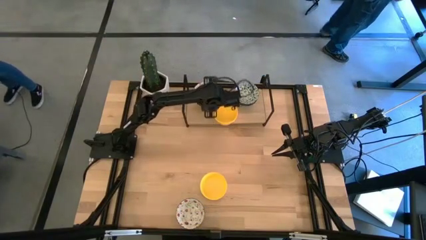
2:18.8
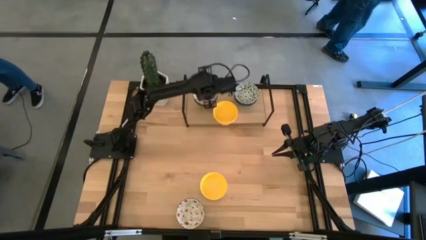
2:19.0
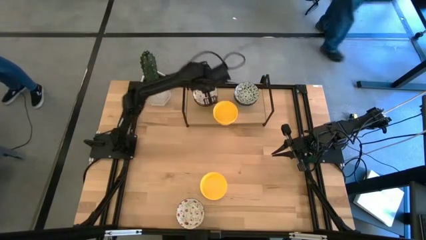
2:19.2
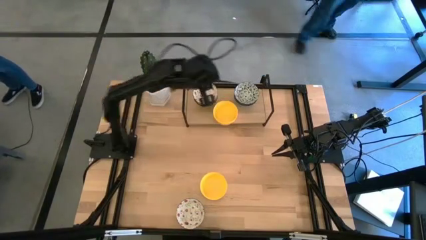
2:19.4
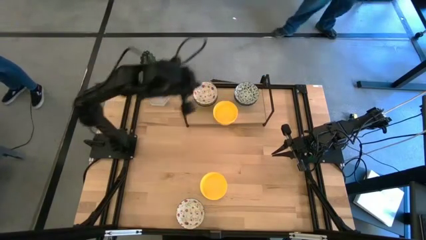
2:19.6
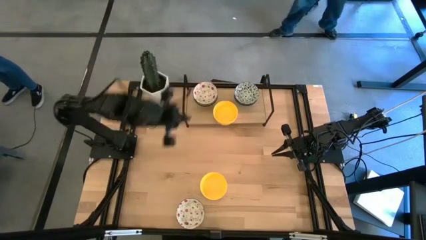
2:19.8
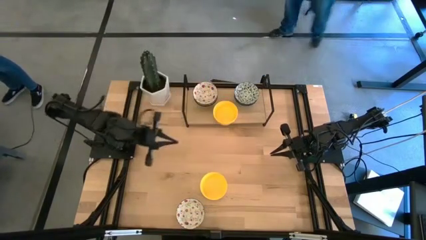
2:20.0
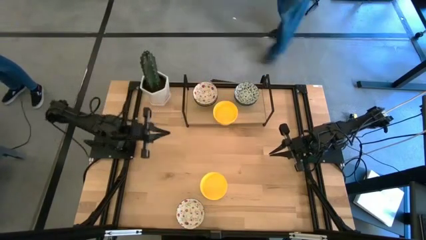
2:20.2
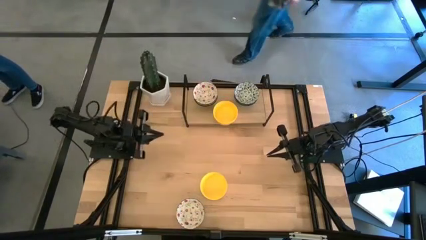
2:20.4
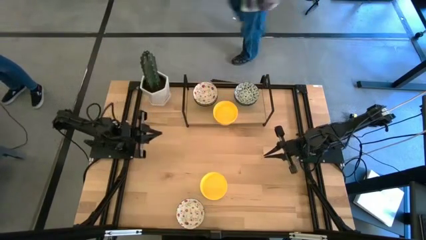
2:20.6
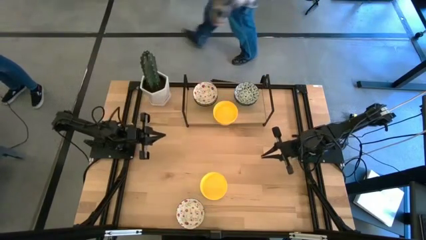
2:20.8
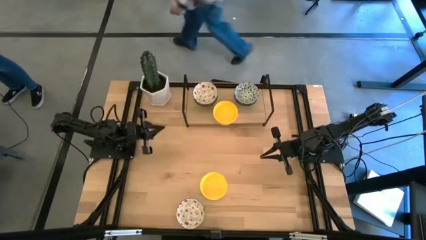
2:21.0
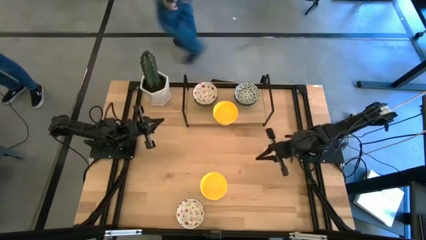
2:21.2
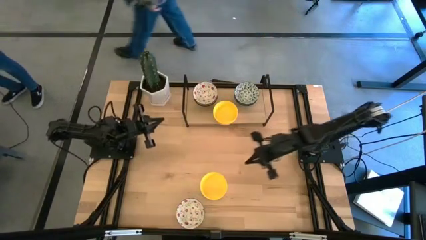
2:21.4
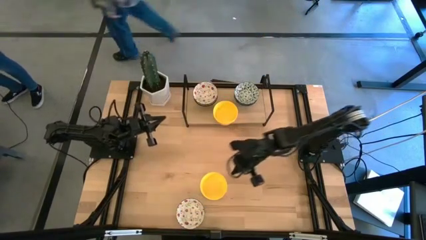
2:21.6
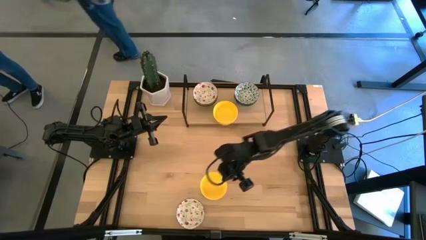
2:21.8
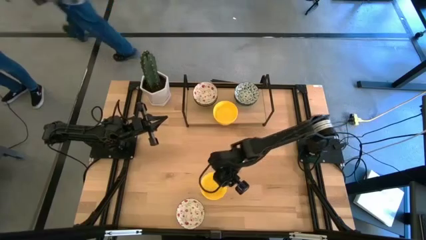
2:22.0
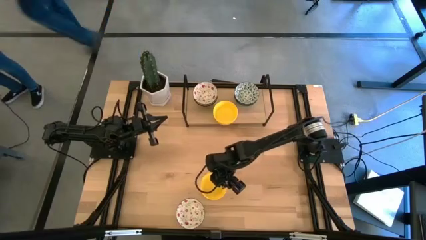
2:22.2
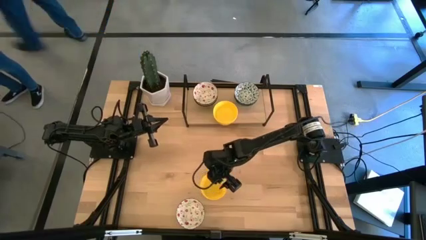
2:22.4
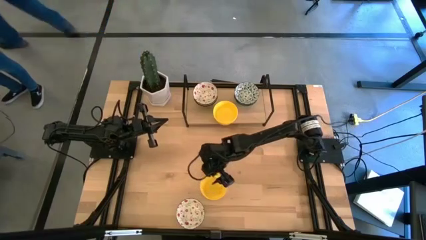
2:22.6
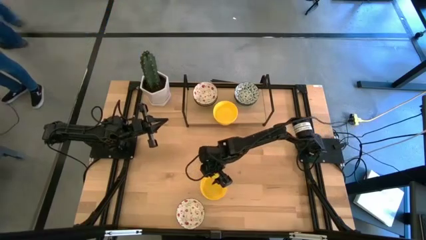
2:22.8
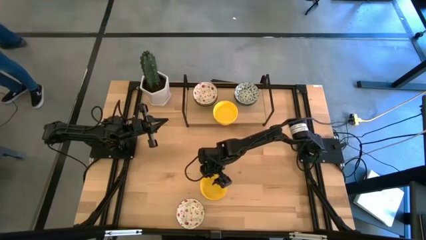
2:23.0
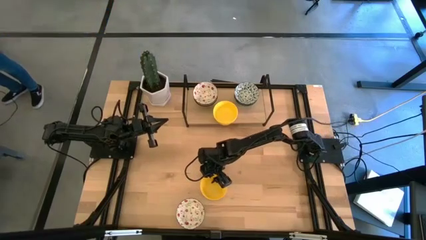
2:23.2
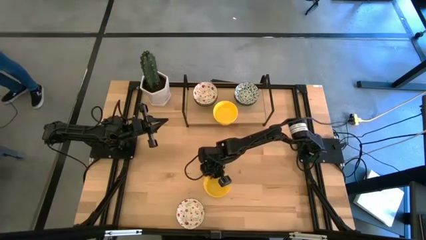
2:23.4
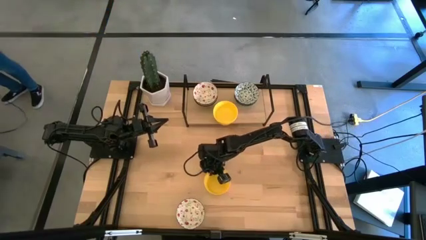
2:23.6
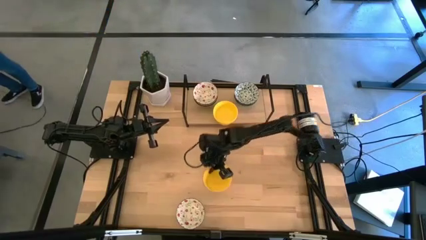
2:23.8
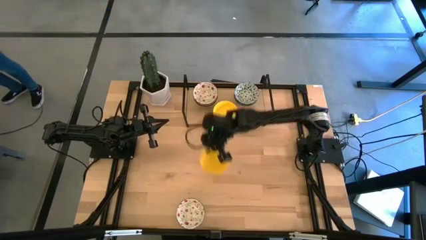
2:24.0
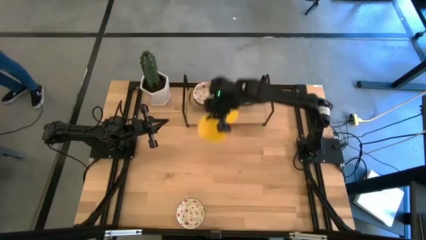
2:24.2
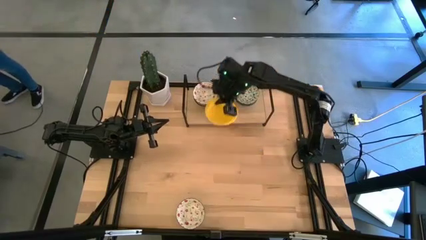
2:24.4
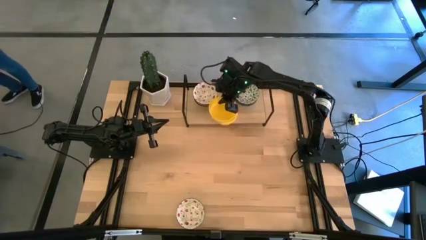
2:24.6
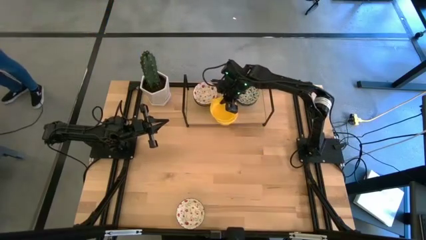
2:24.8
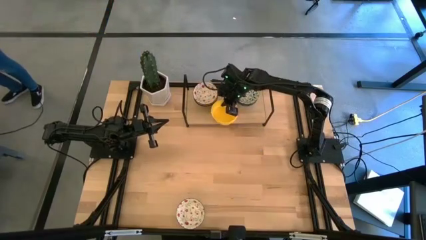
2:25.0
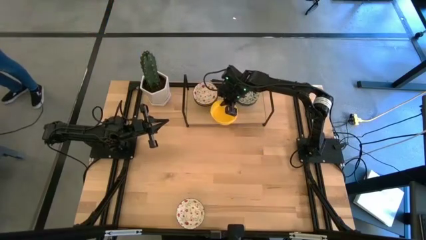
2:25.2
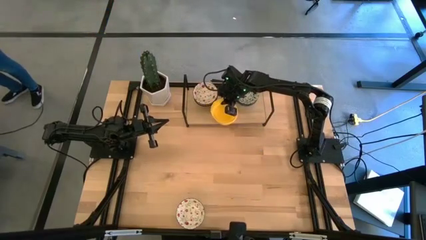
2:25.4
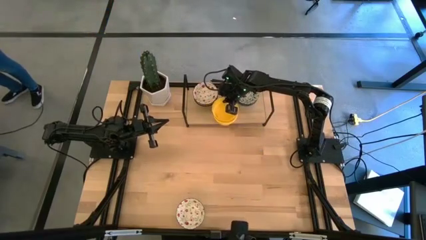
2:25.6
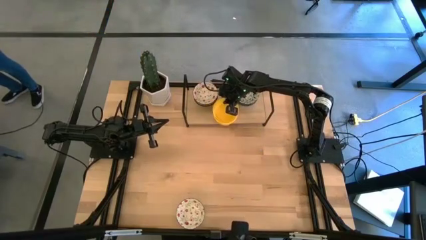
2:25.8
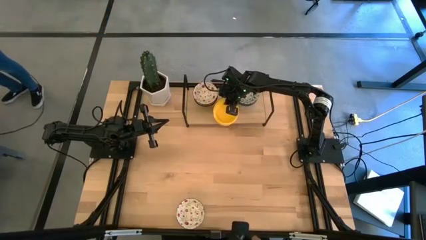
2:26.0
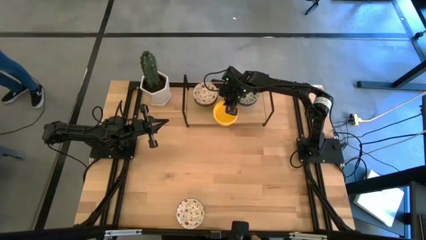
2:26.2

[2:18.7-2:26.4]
Task: Pick & Place Mini bowls
Stack the yellow bowl on top of the yellow bowls on the shelf

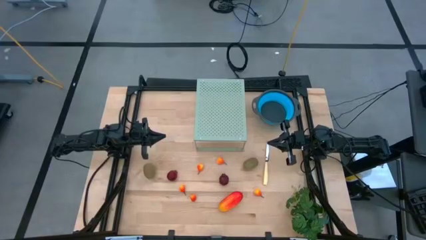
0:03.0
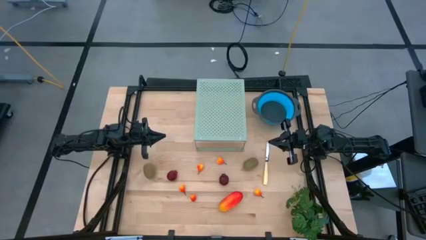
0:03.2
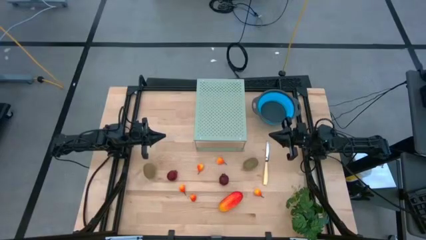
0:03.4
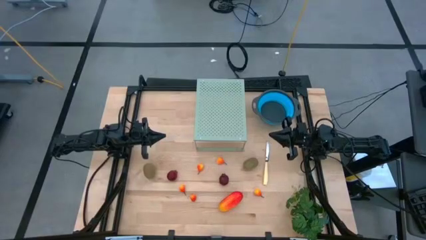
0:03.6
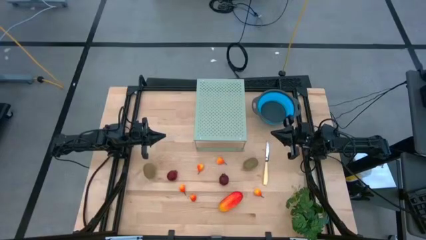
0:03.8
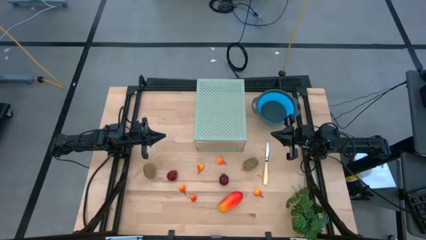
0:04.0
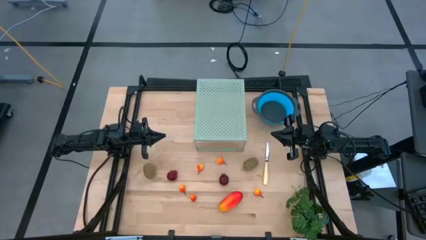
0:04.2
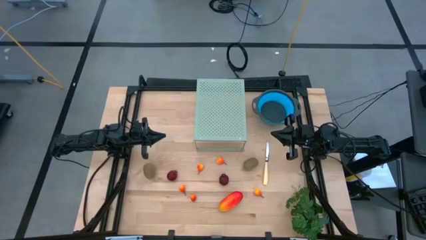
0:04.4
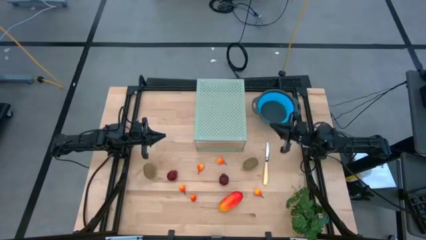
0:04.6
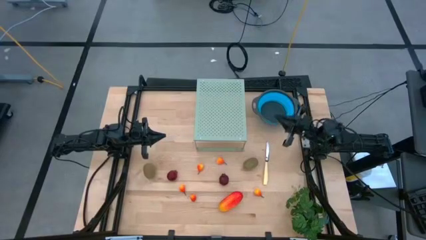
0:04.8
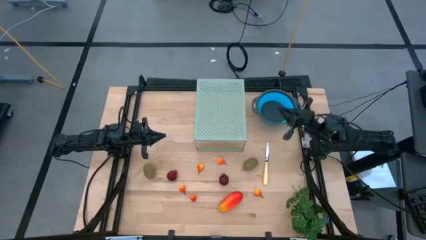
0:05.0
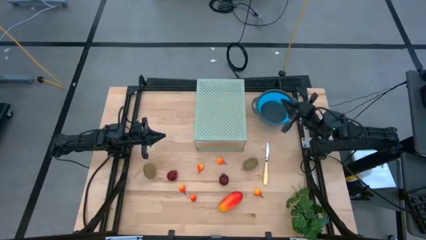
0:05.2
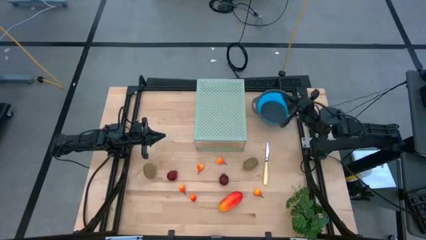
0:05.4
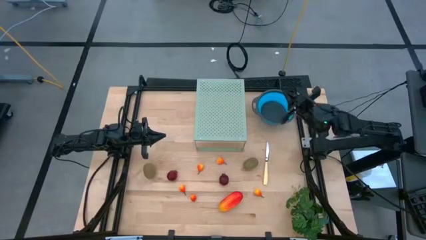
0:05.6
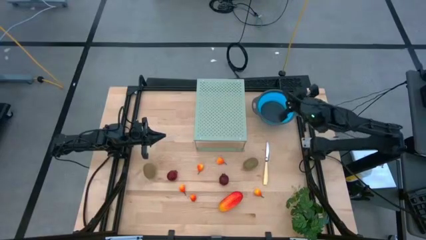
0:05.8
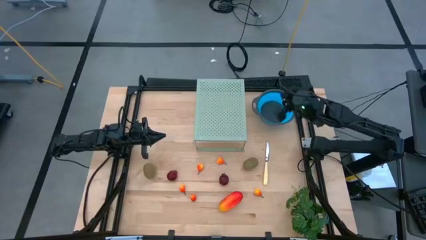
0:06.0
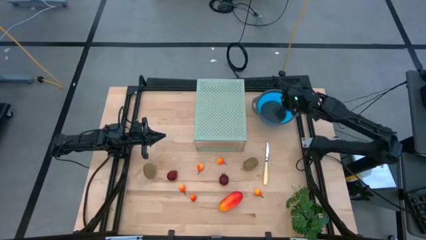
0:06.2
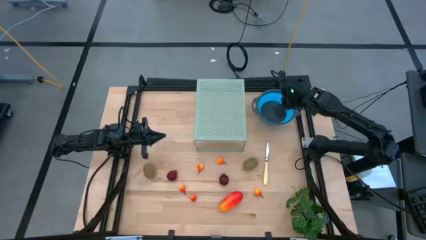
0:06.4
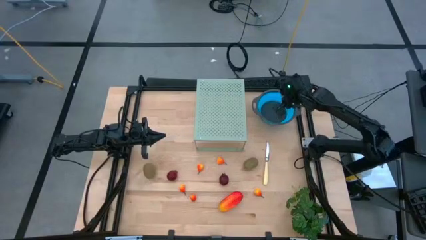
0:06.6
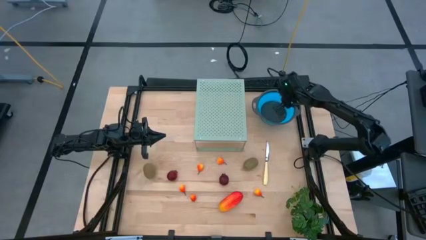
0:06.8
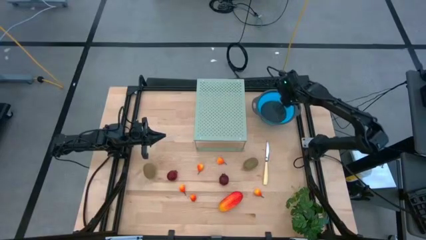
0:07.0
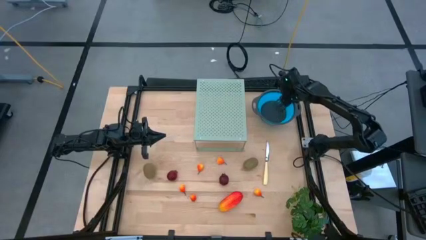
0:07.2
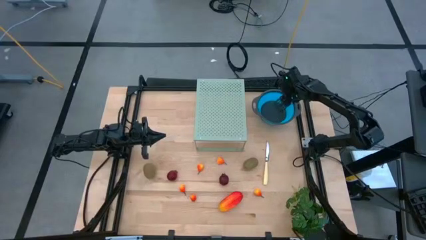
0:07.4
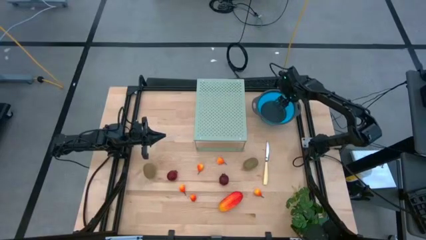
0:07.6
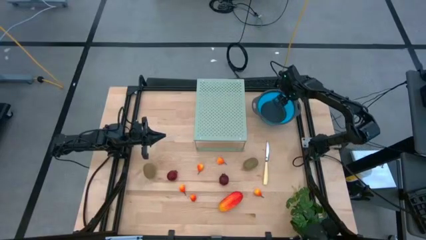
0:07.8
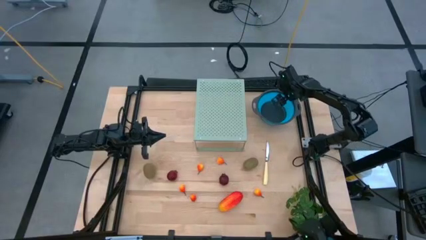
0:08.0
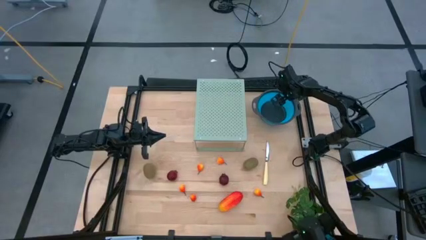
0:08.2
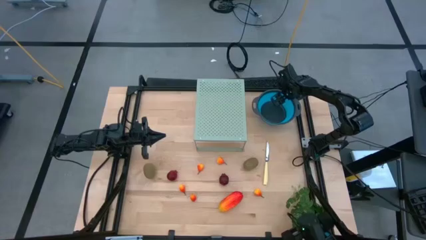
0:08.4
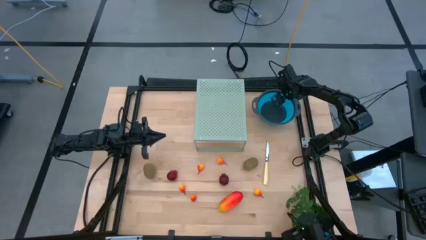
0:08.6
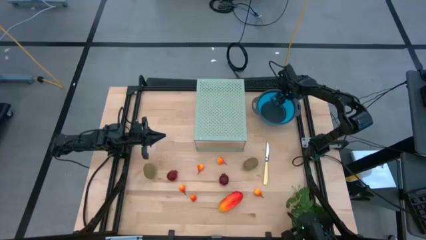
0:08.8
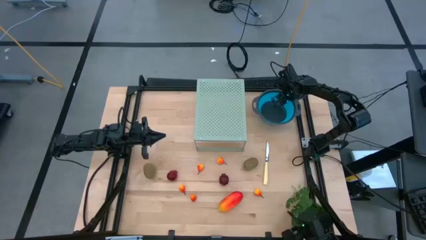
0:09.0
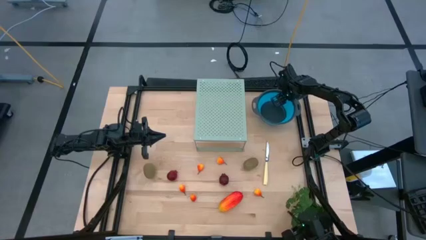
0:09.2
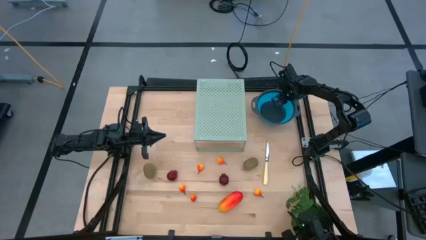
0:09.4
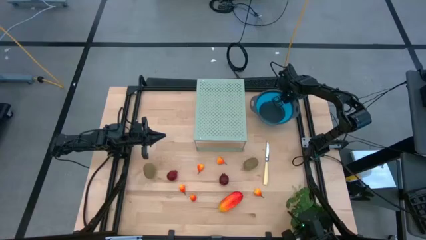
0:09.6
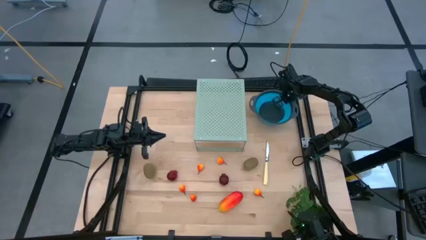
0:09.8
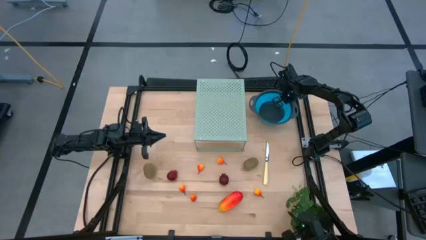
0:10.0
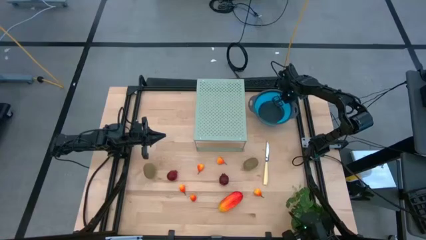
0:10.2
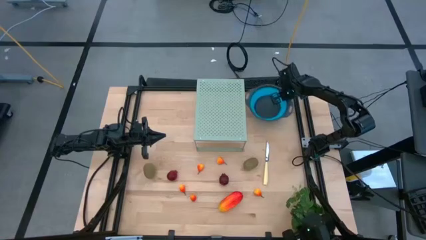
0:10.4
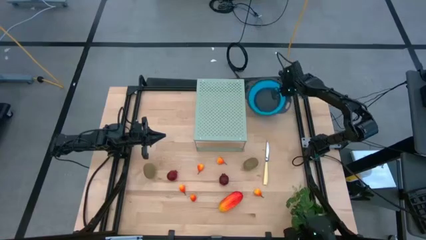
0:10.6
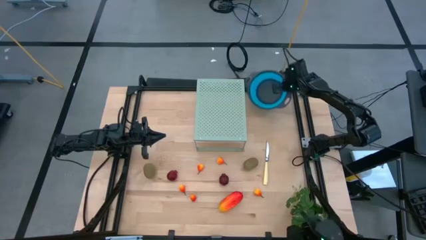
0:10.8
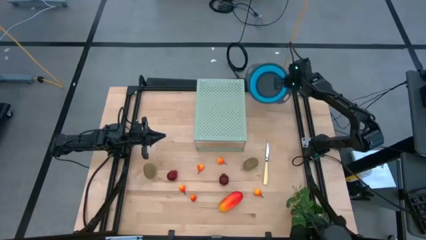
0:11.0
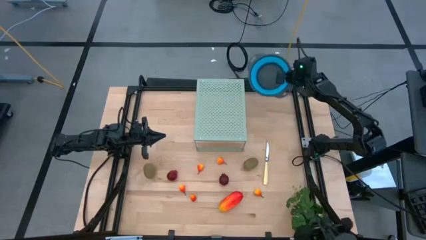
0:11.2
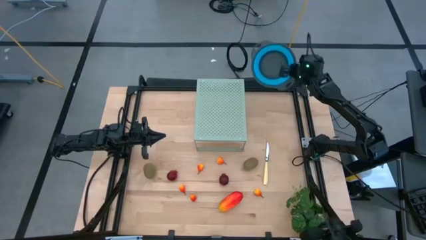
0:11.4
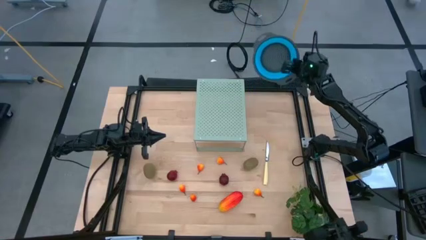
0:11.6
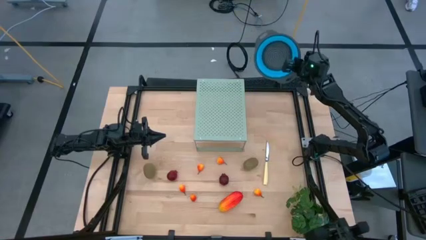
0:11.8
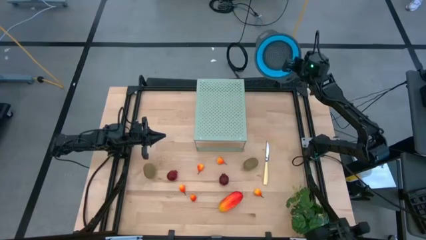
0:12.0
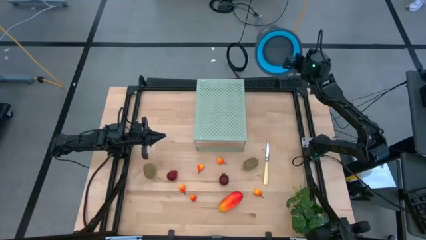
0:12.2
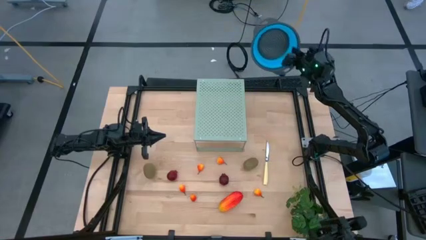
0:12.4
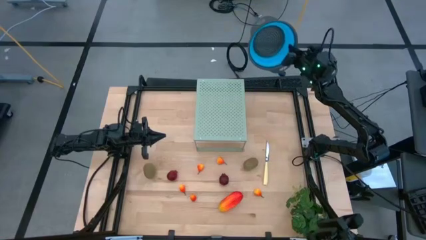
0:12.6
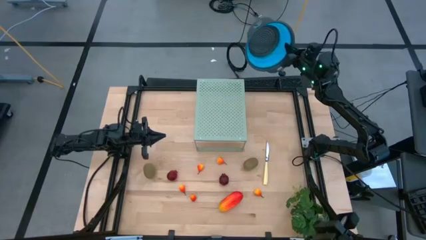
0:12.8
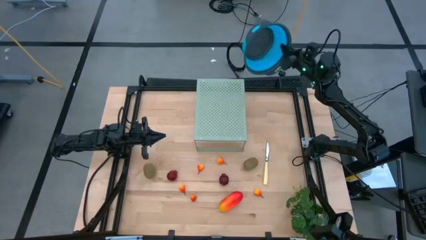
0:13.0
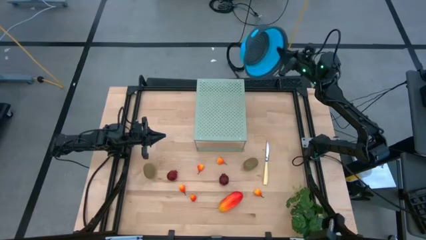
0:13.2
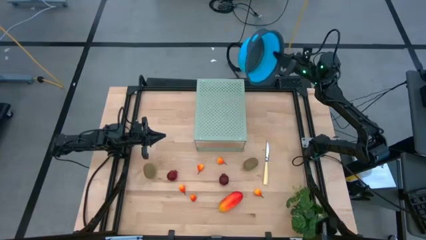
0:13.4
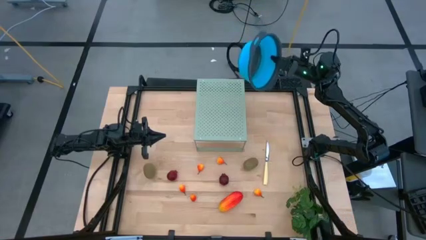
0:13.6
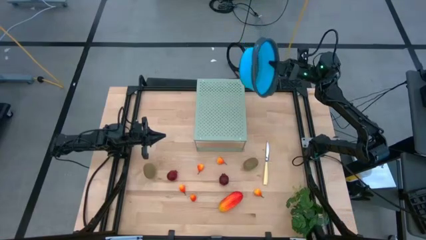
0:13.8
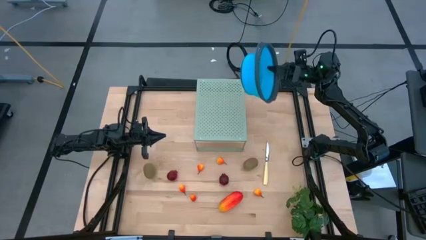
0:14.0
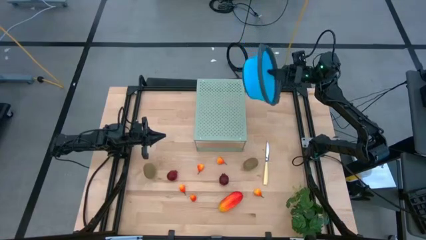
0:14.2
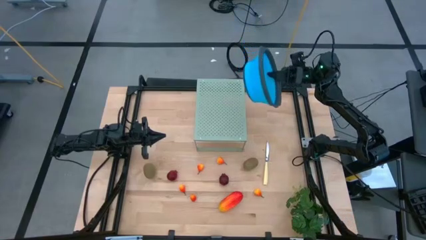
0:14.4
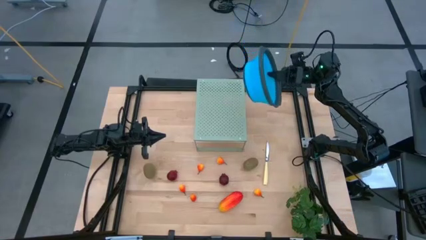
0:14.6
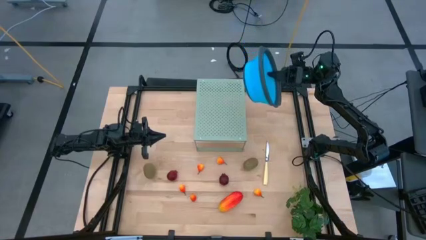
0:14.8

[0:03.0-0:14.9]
Task: Pick & Place Fruit
Put the blue strainer bowl on the shelf
